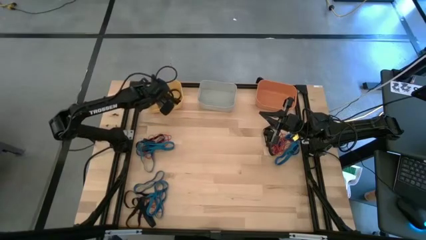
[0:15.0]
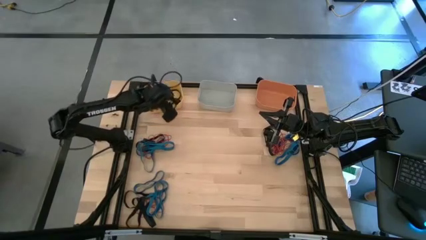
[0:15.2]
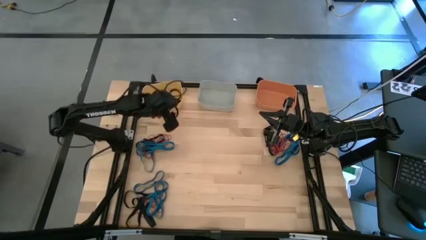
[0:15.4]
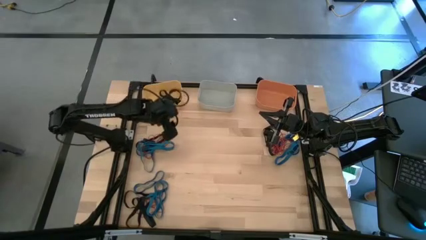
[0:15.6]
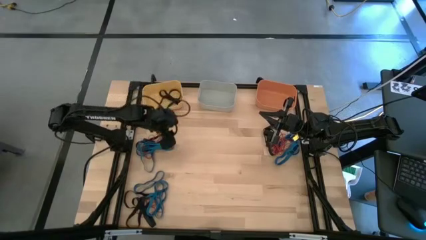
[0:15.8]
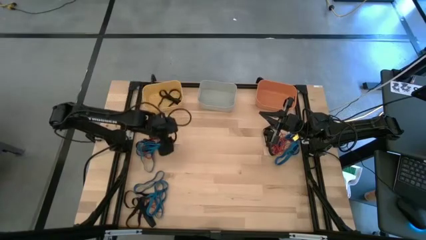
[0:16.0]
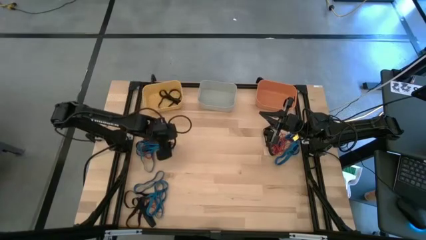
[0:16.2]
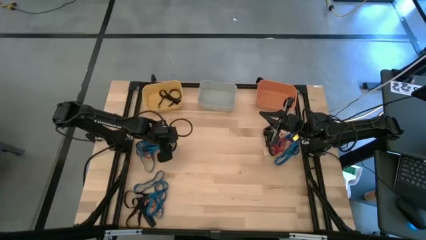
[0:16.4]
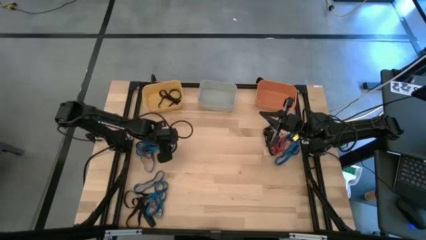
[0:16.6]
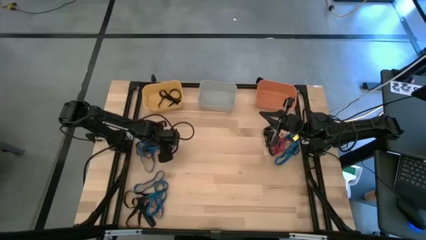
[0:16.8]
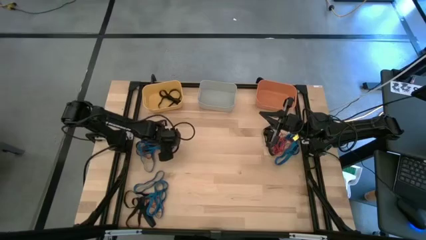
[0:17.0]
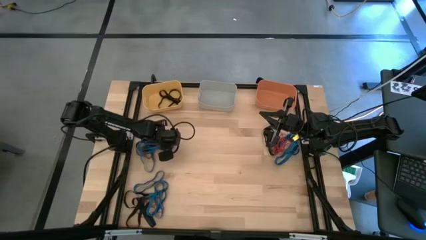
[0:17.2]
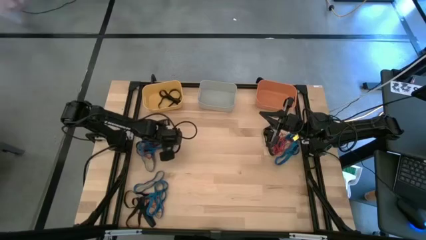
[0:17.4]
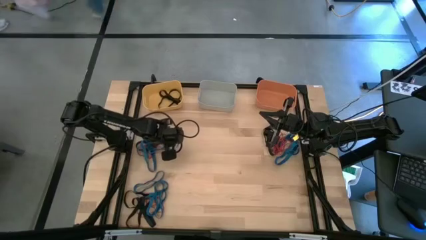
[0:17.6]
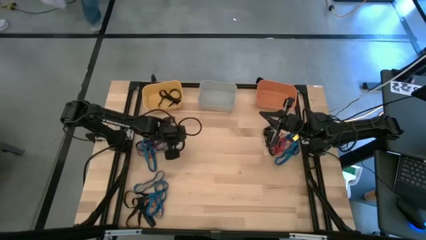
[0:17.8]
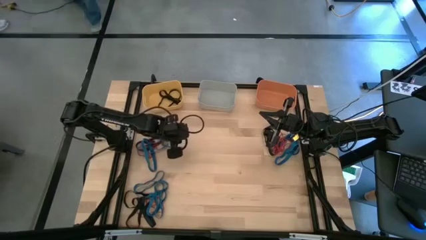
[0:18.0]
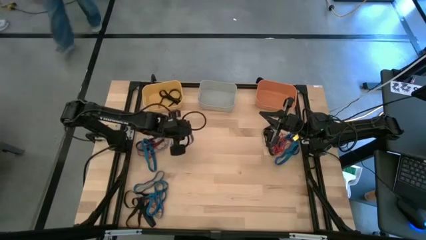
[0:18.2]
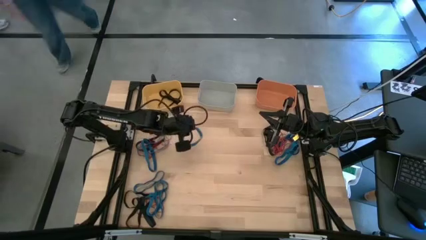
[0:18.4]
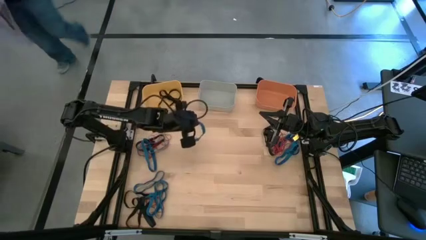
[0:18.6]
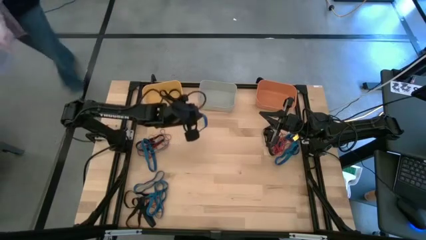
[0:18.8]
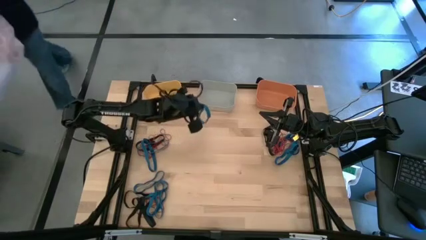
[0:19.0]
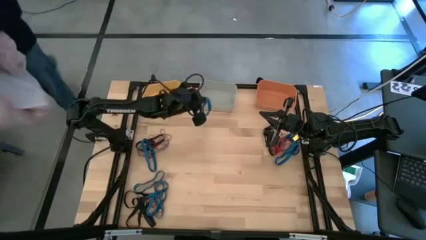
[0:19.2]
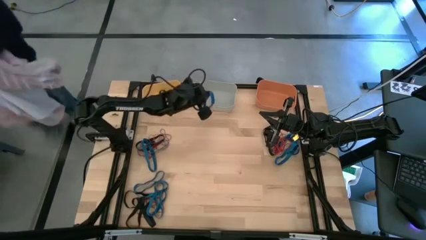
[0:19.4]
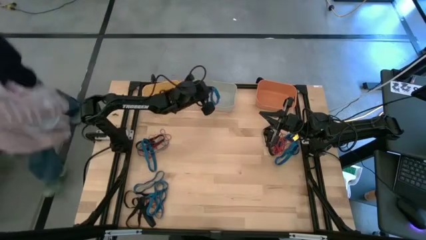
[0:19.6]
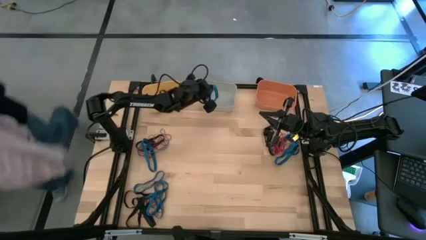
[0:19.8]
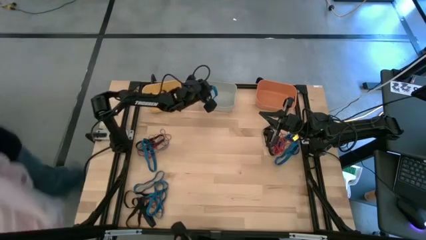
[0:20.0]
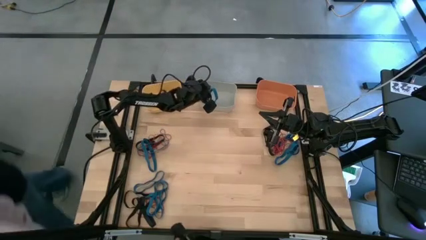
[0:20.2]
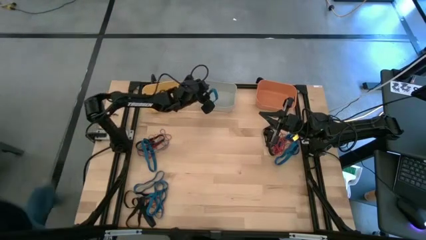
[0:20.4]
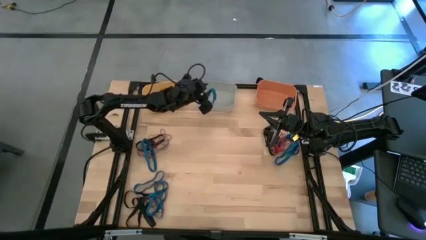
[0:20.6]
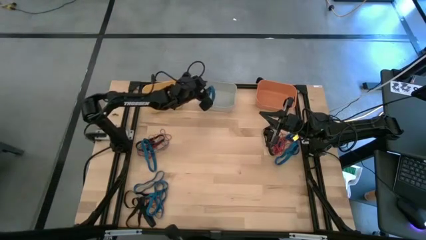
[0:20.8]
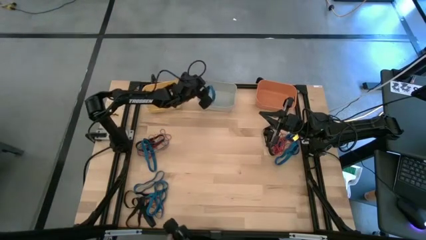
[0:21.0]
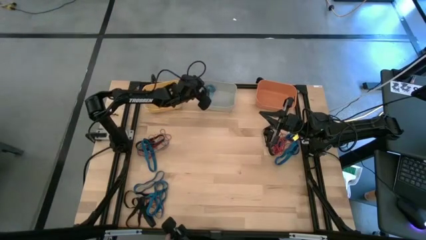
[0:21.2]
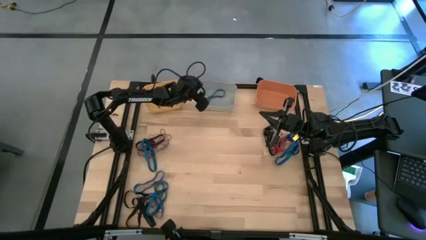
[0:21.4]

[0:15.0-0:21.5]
Task: Sort rubber bands into baskets
Put the blue rubber band into the grey bin

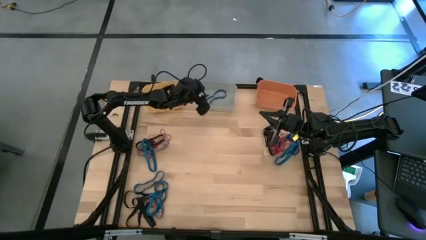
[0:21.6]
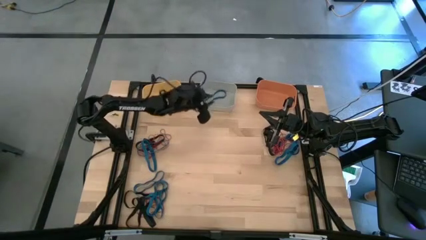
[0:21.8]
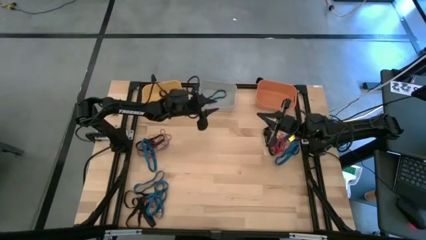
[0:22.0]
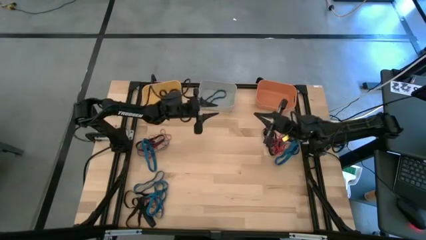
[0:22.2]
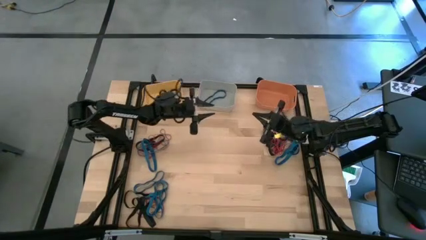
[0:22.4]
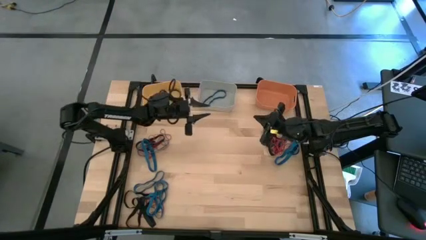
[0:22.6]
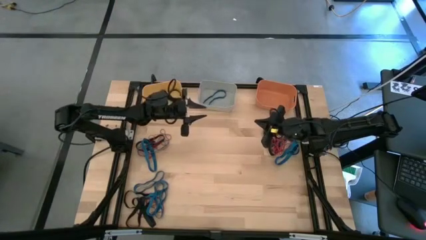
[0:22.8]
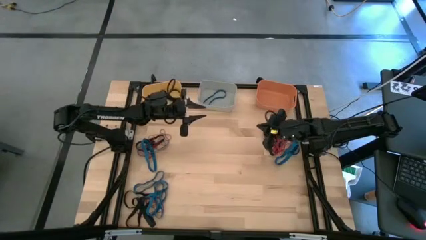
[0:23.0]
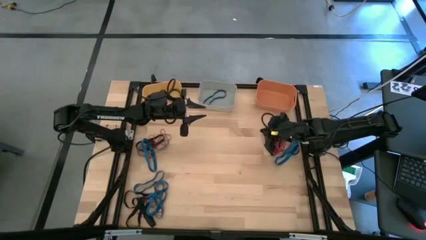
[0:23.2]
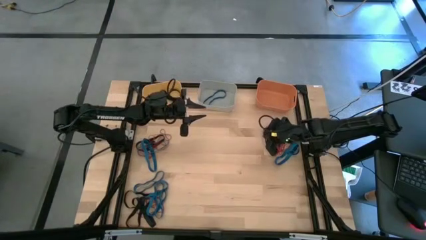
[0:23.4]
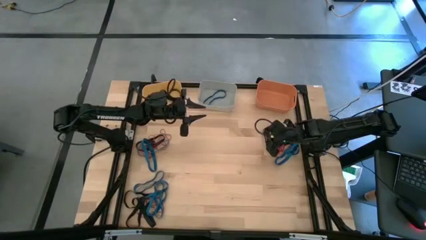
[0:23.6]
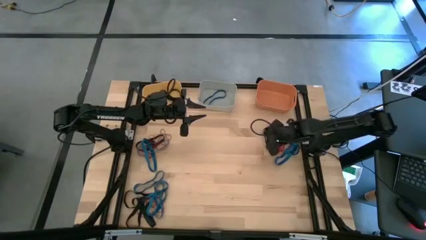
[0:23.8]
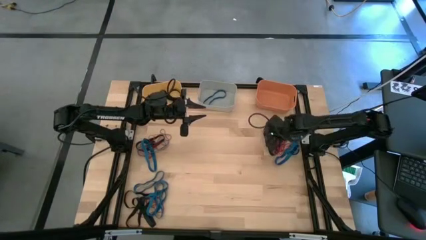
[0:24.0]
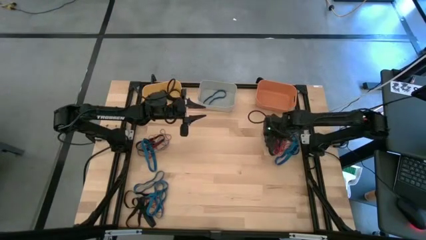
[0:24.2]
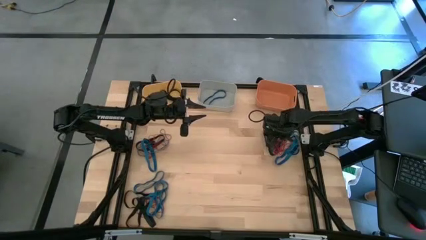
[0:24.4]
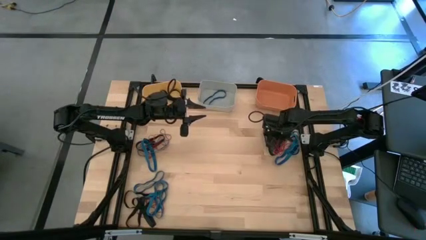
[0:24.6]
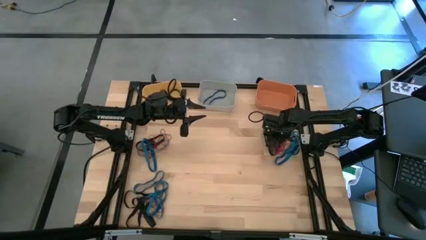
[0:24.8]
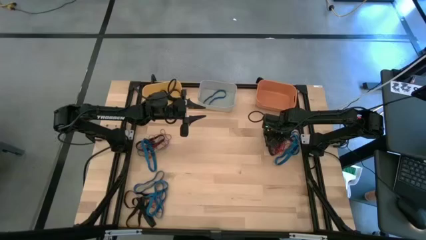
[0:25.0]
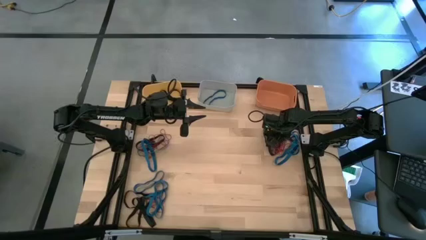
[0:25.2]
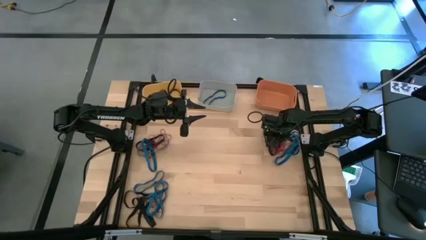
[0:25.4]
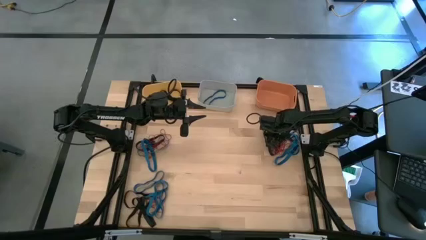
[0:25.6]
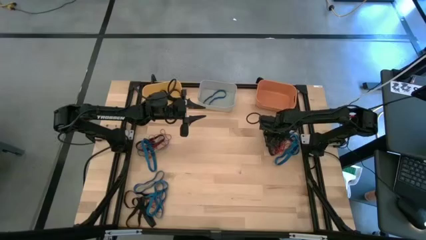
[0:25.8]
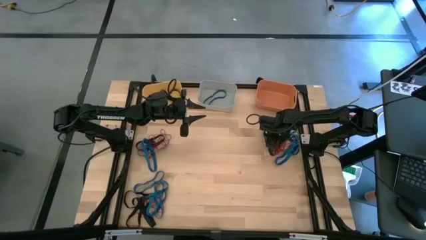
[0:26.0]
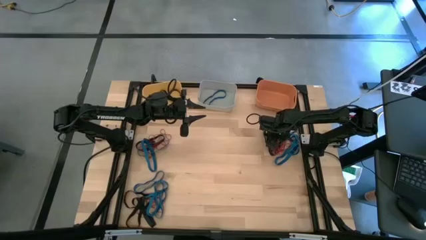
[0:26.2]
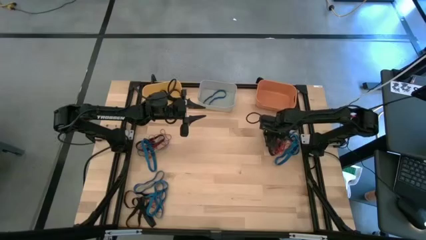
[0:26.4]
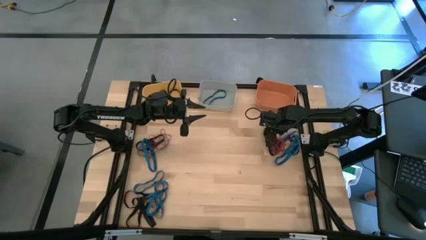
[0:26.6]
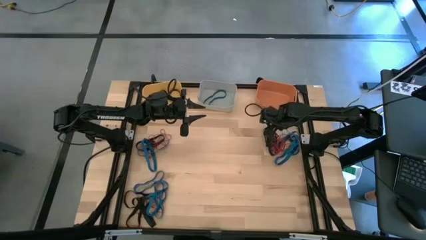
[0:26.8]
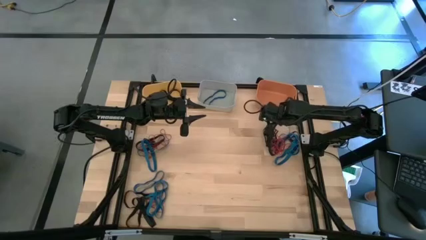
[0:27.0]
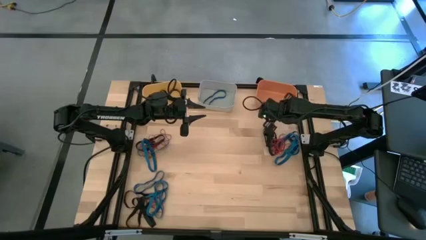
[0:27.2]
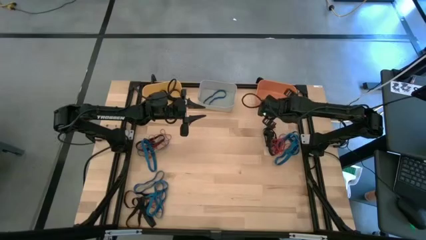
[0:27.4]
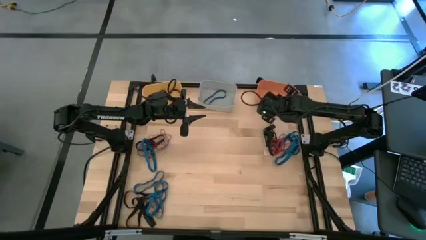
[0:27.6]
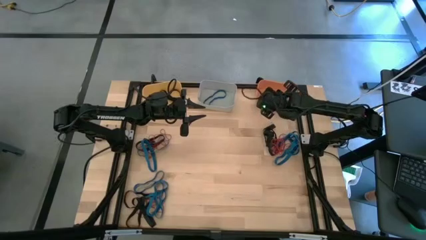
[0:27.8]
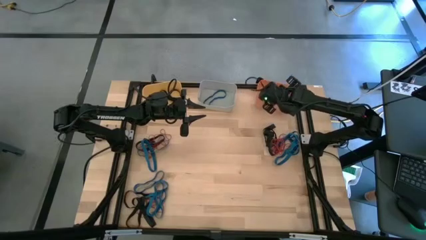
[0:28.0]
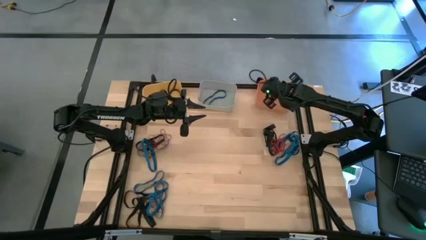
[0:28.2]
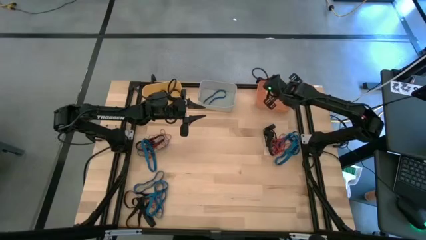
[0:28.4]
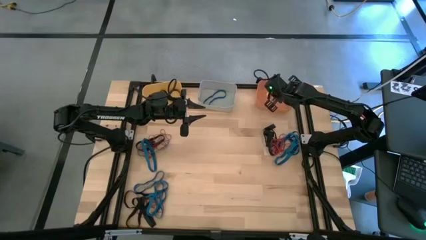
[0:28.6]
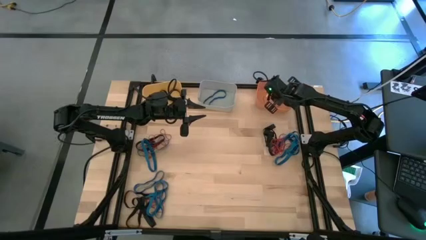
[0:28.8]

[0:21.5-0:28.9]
Put the red rubber band into the orange bin

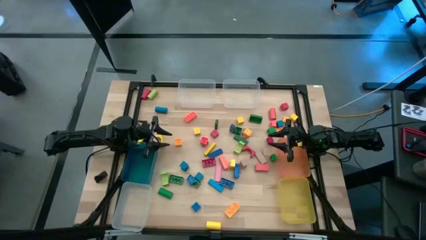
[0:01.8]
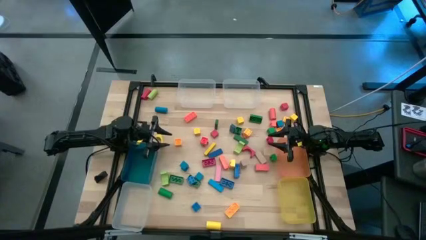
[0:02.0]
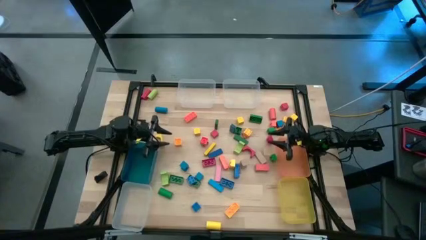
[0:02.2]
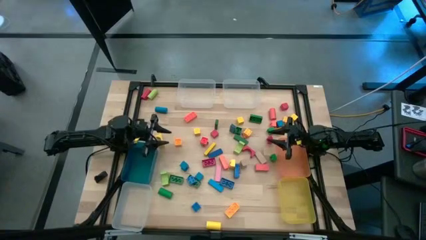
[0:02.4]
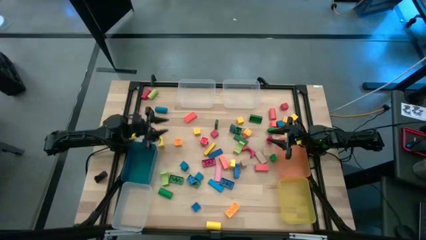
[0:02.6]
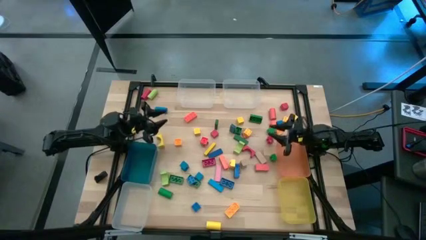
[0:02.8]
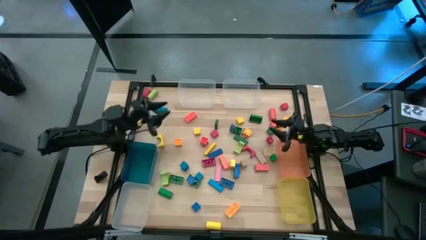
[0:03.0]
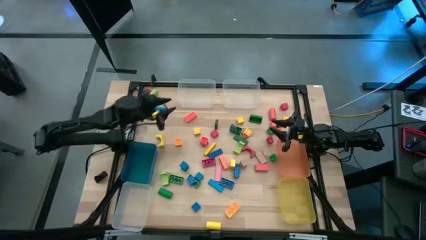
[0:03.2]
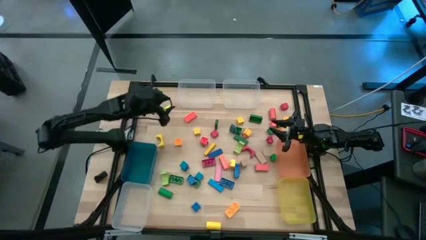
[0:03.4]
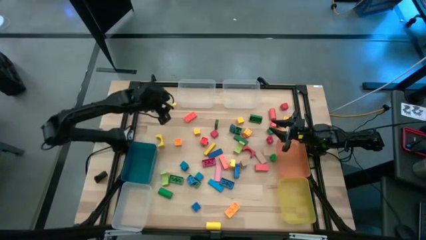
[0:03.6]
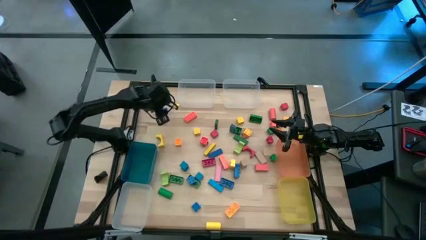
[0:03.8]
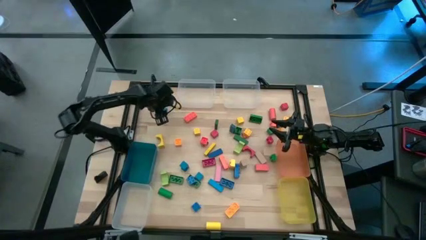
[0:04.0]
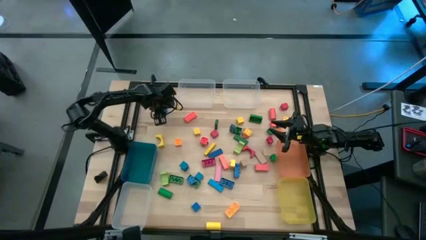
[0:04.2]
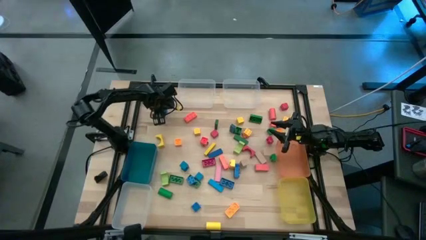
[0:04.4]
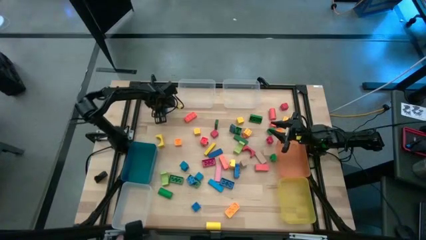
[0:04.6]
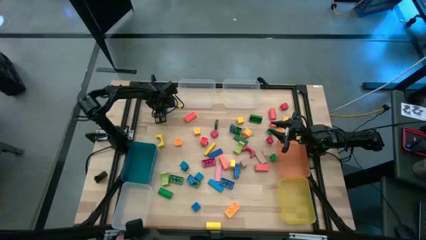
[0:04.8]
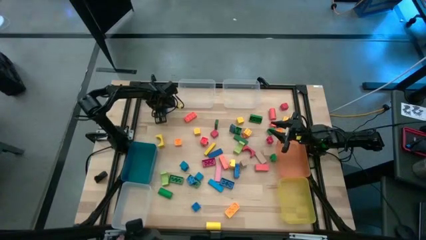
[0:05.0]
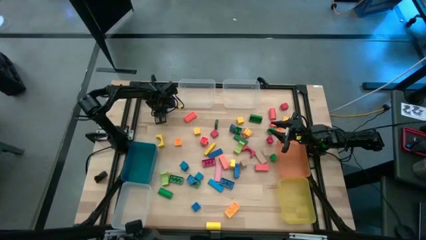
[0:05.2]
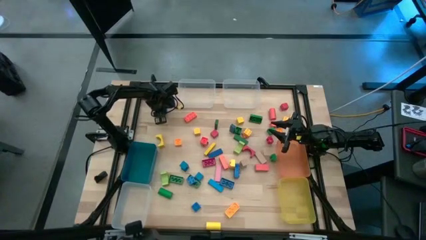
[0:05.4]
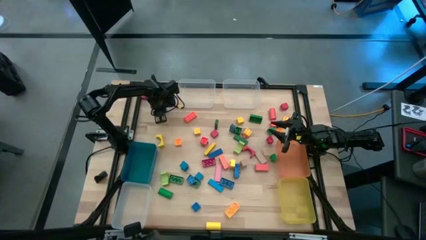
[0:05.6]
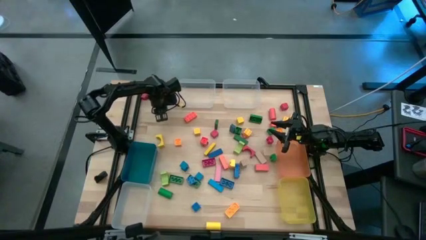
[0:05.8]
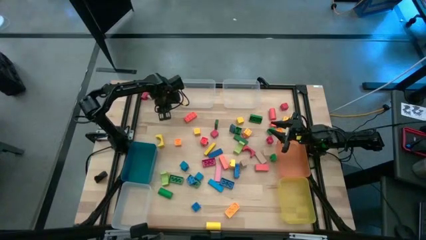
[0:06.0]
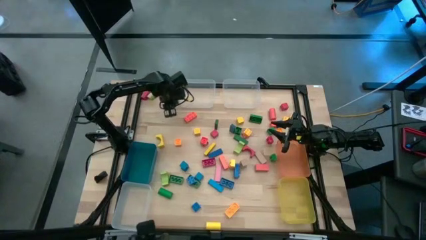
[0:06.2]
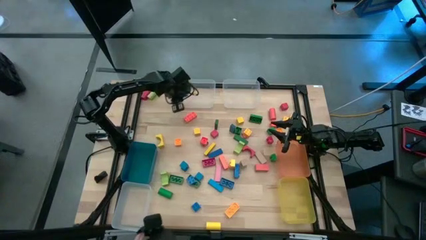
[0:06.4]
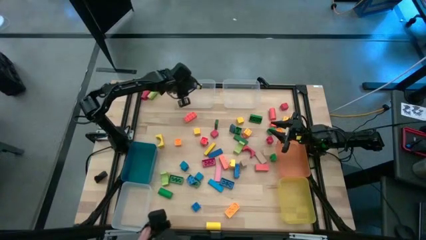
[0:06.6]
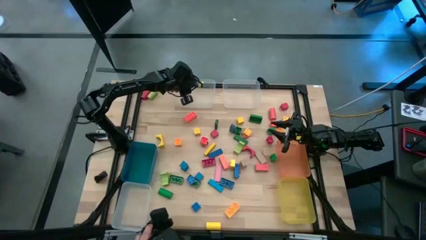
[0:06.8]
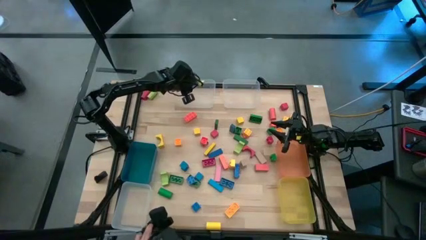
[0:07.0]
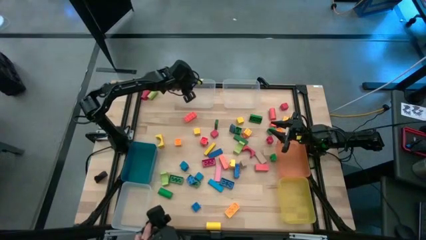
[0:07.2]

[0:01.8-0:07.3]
Task: Sort blocks by size
Put the blue block into the top left transparent bin
